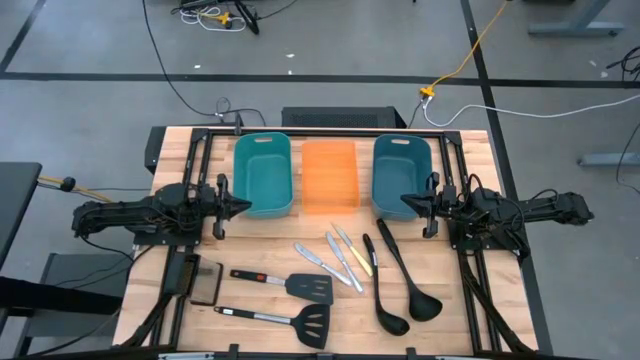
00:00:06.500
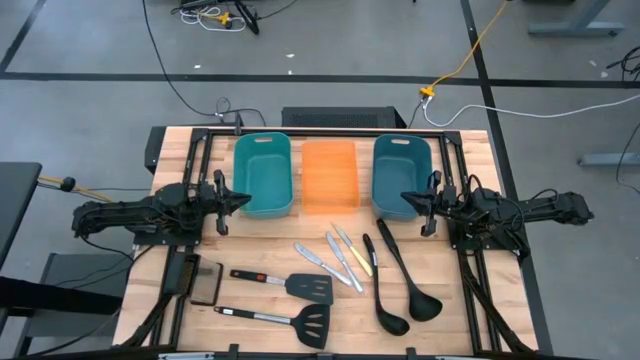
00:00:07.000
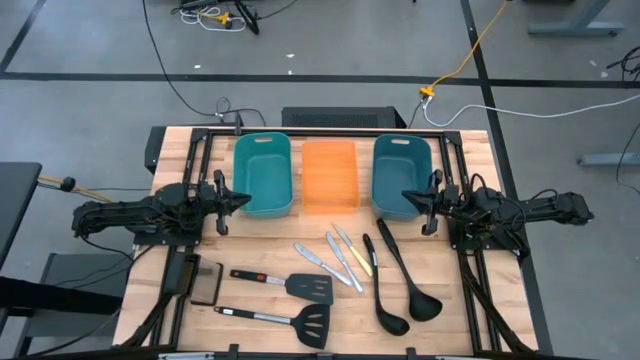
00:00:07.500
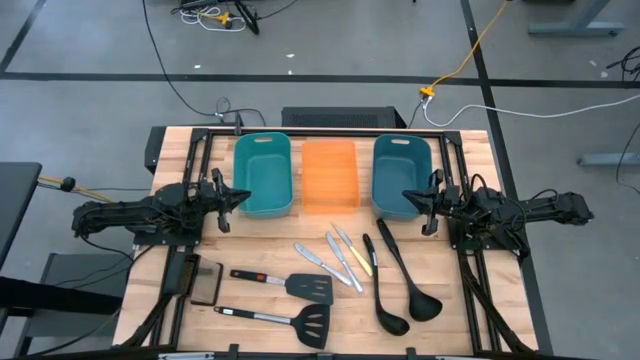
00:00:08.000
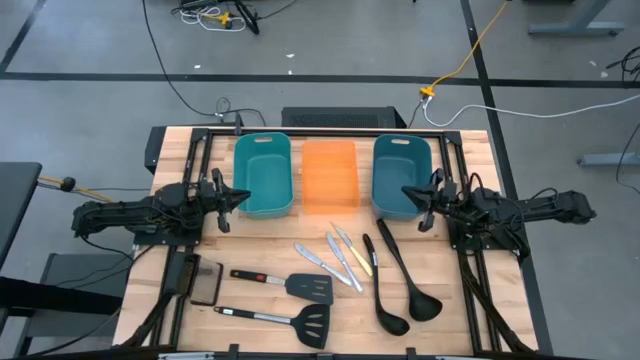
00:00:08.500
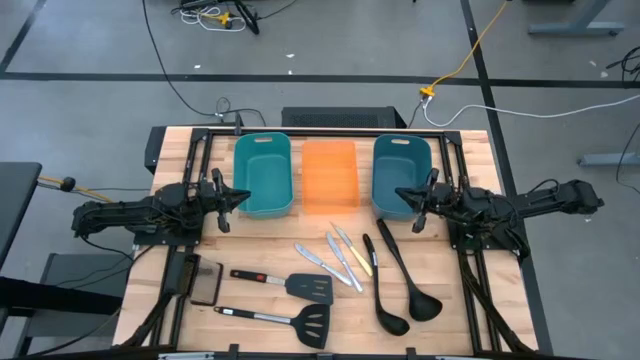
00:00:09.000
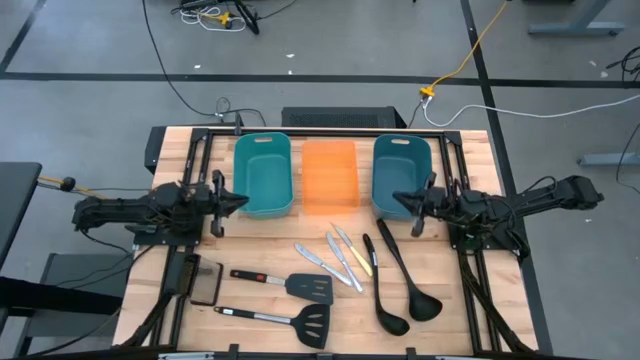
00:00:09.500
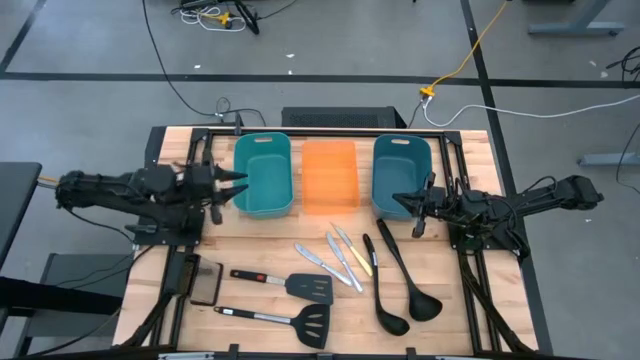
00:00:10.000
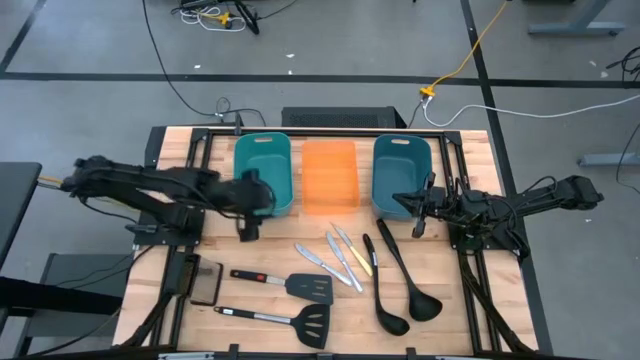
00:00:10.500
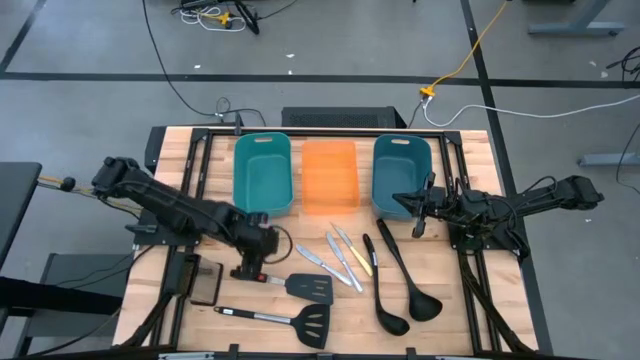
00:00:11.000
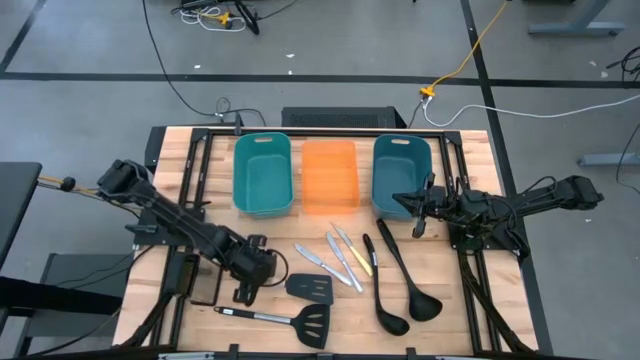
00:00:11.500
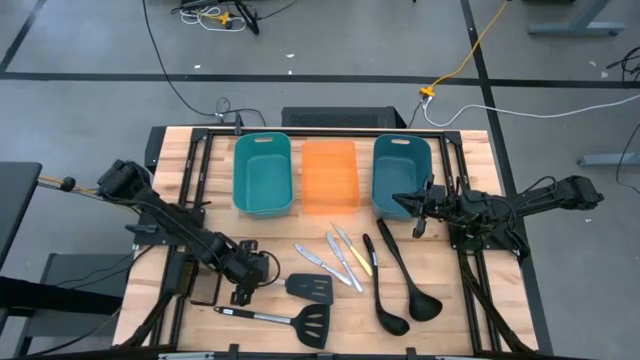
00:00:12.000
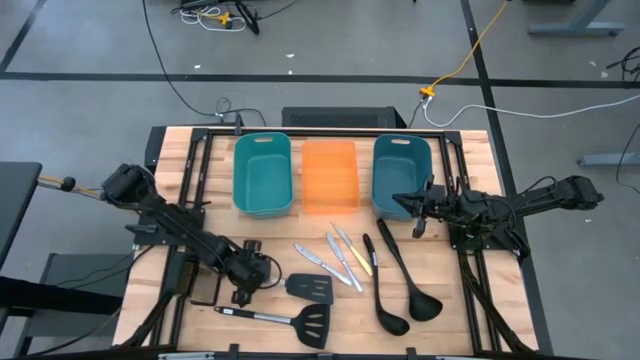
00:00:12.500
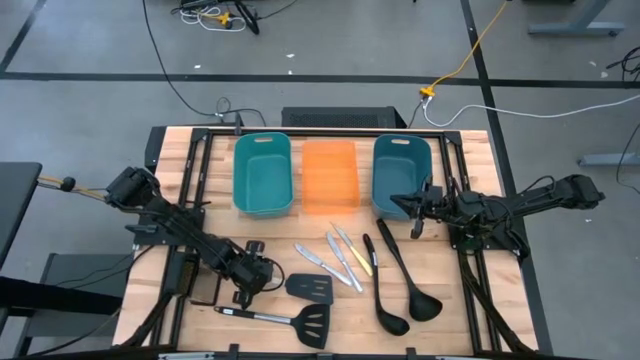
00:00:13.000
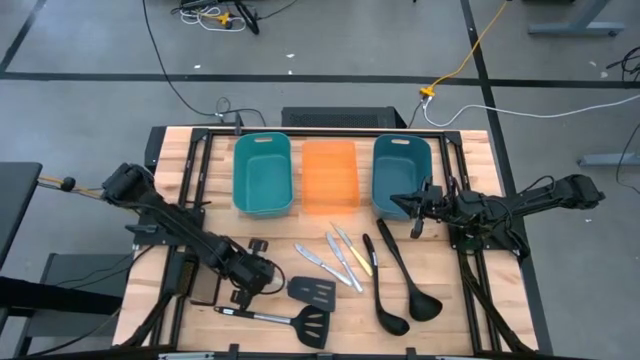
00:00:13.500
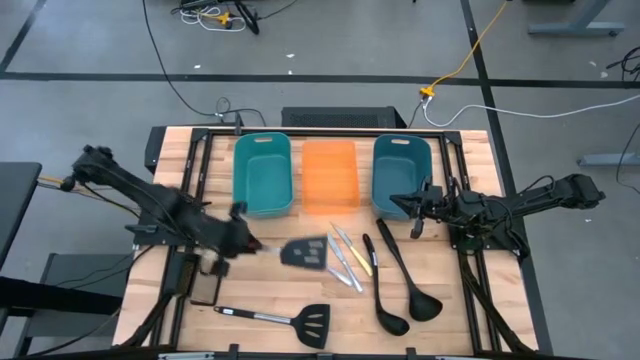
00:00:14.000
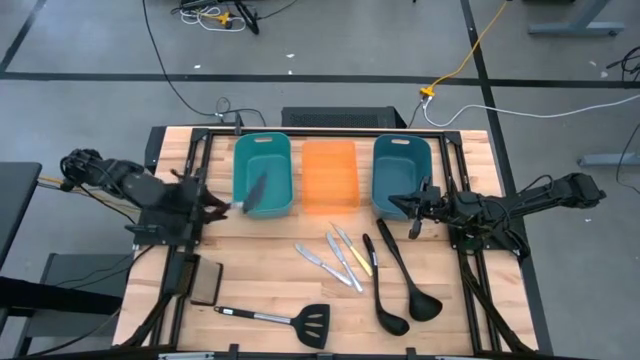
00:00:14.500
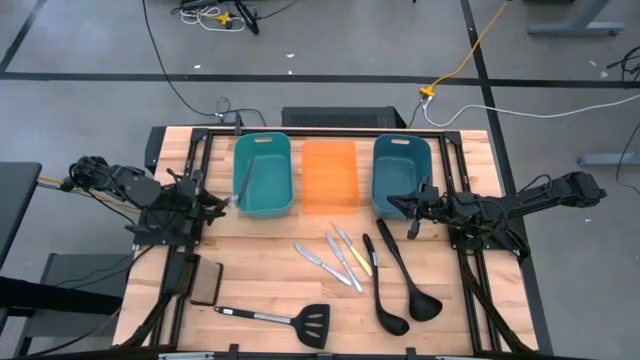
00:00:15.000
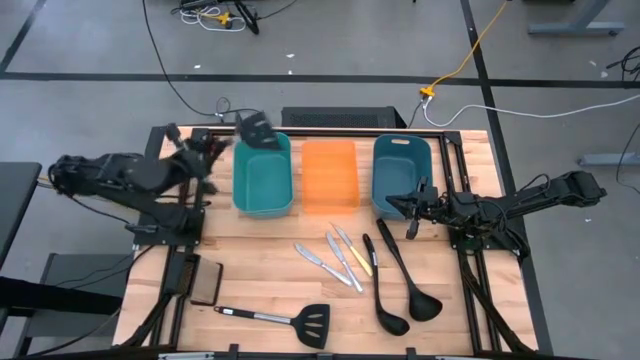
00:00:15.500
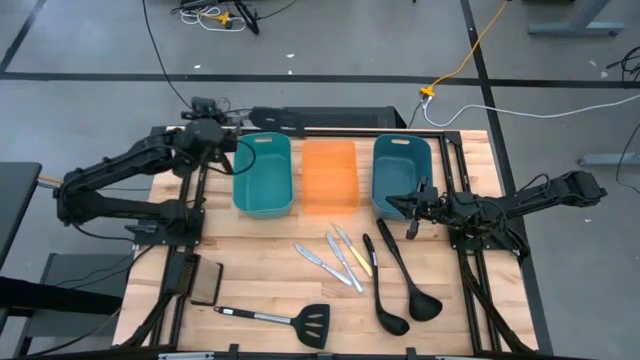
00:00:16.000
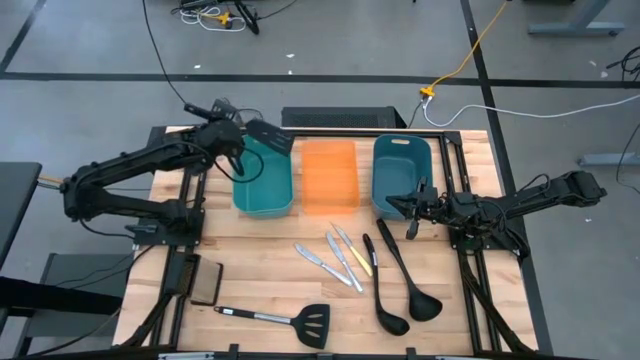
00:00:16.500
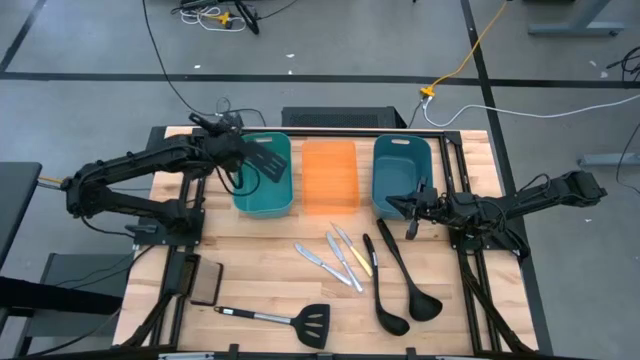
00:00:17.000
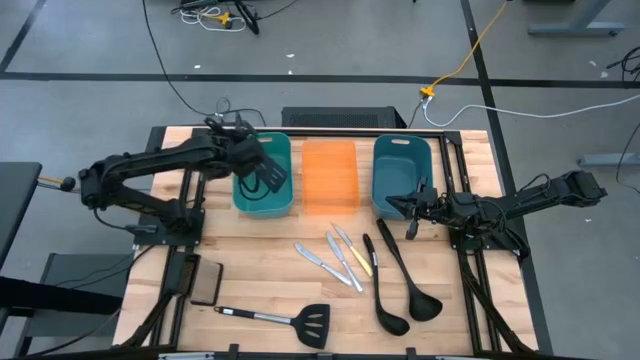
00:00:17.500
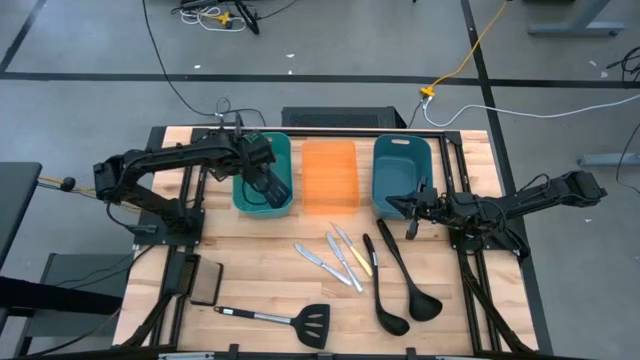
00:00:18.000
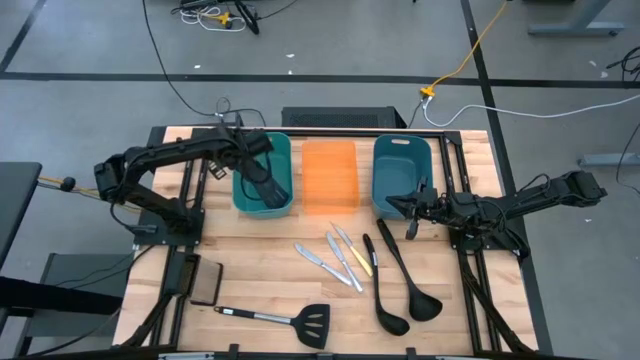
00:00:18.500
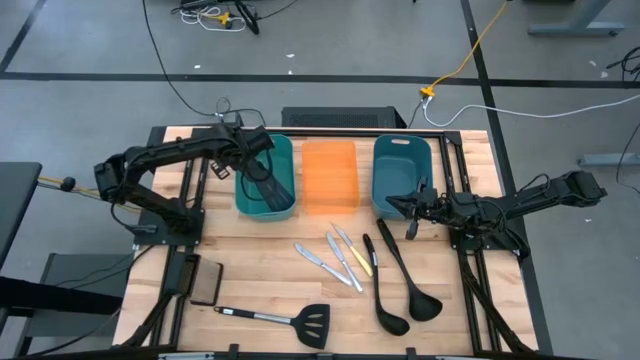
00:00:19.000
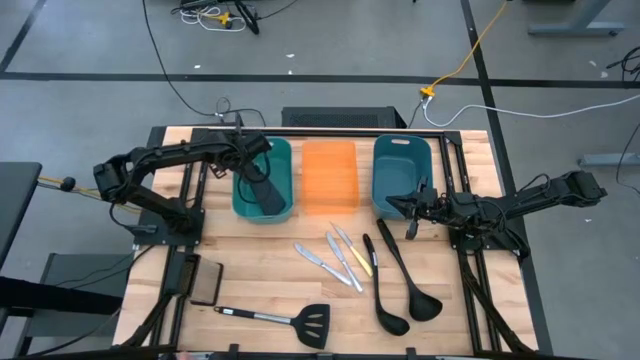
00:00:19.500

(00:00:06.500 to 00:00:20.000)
Task: Pick & Place Kitchen Items
Put the gray spatula into the green bin
